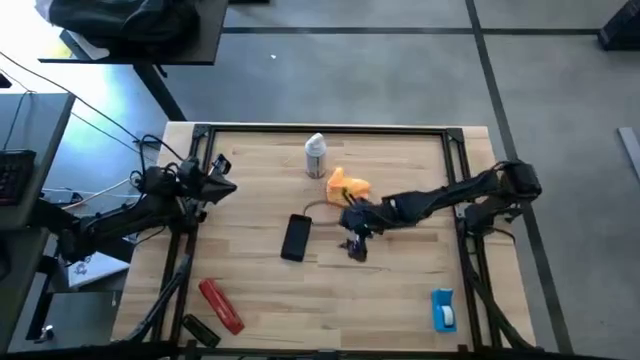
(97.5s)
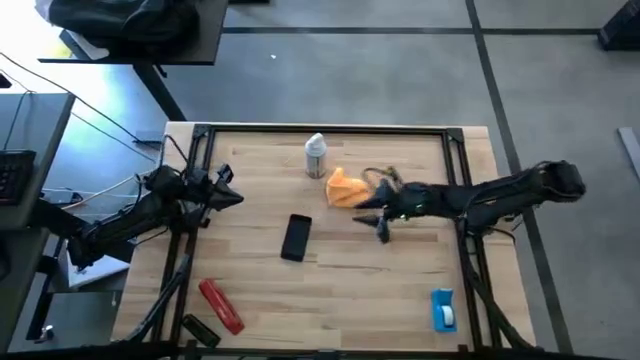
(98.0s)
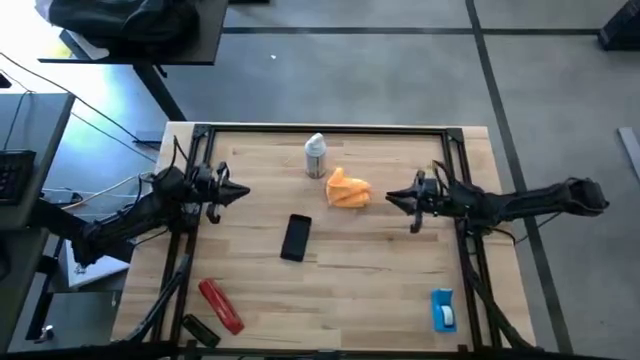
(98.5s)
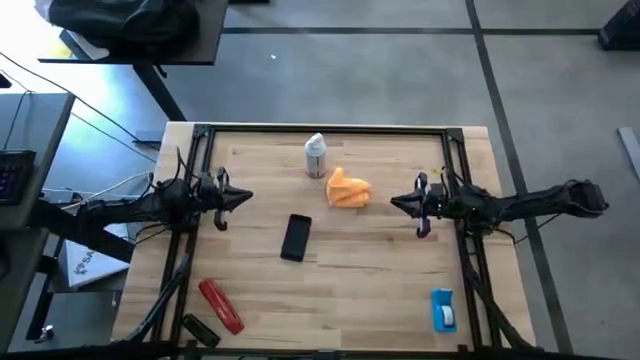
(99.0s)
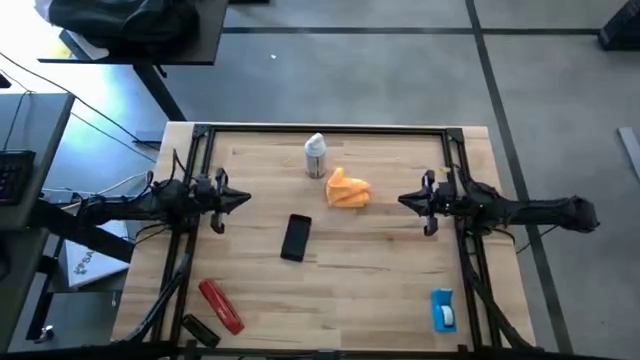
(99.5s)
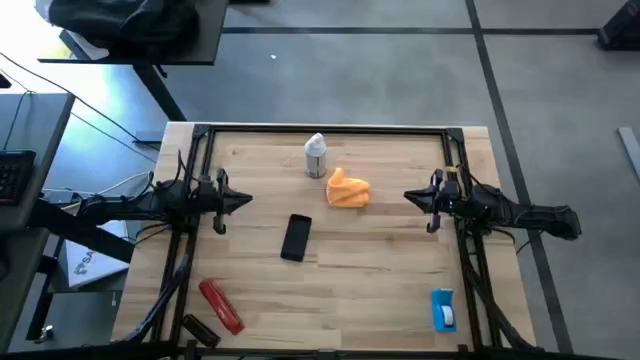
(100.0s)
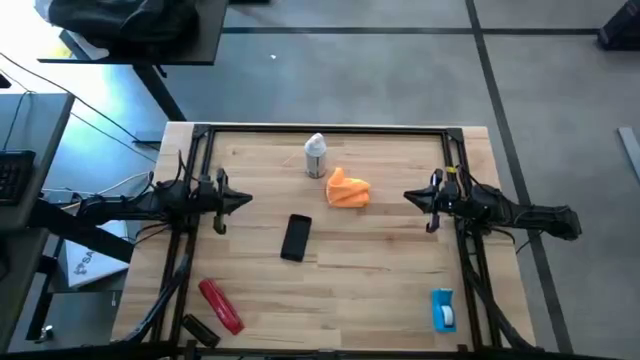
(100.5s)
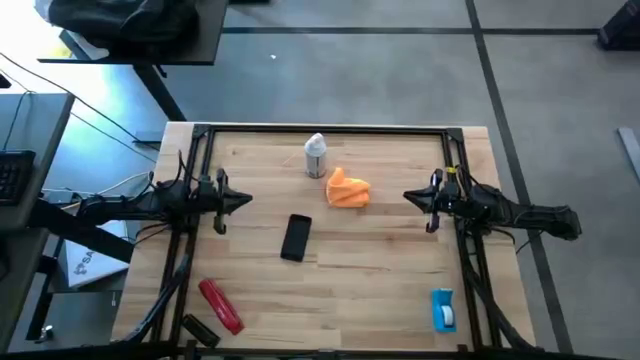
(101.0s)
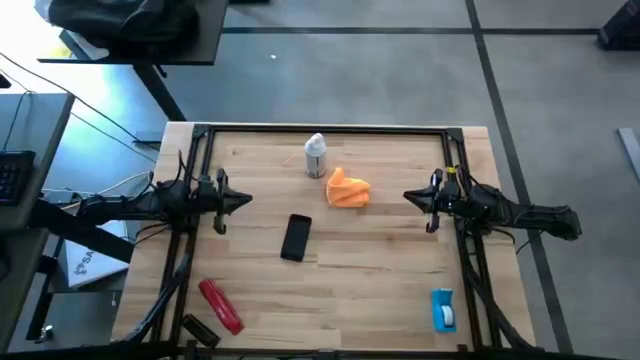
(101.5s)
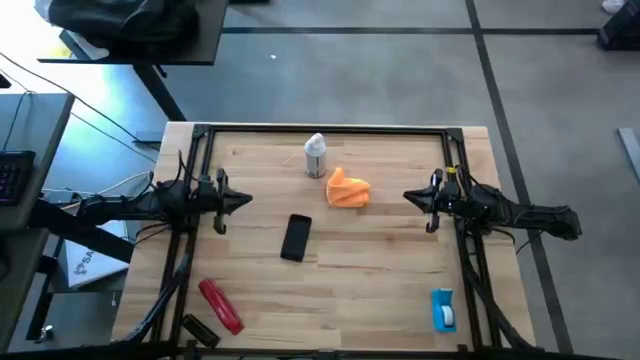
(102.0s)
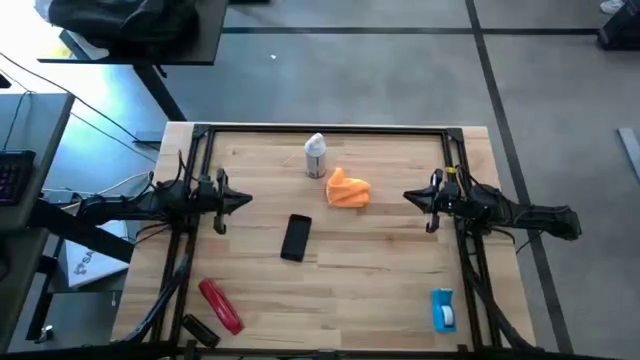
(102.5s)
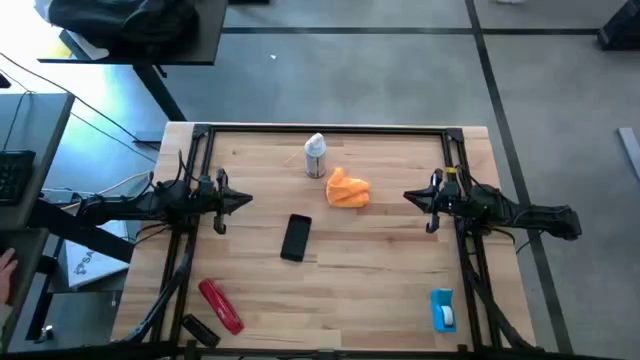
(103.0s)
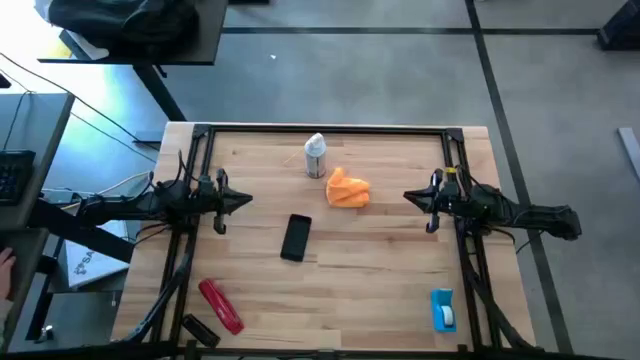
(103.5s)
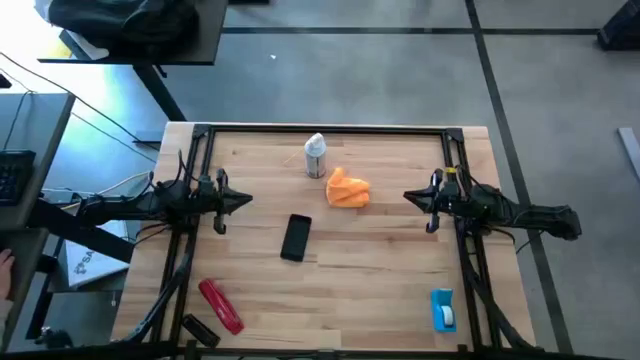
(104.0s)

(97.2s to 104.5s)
Task: Apply microfiber cloth
Return to Home Position

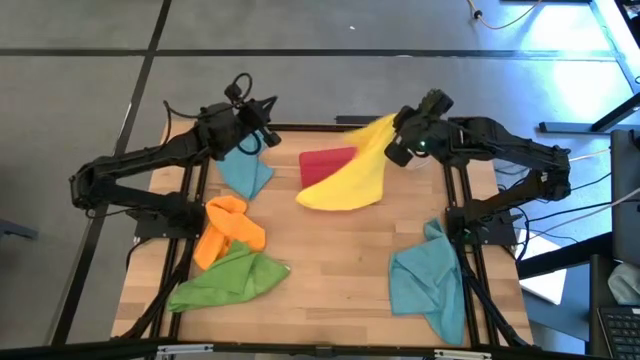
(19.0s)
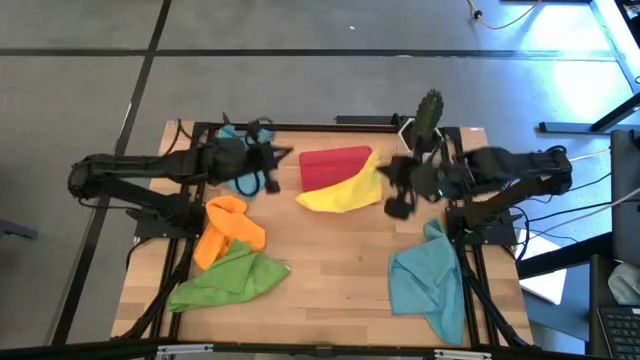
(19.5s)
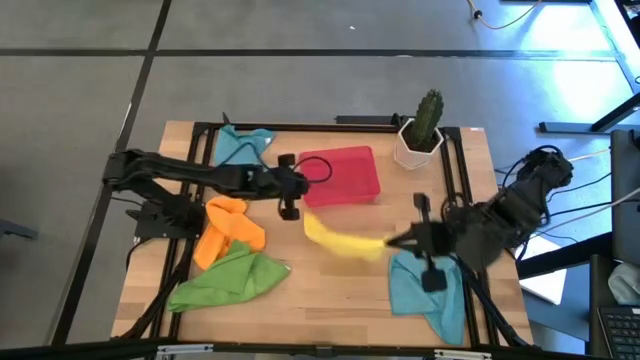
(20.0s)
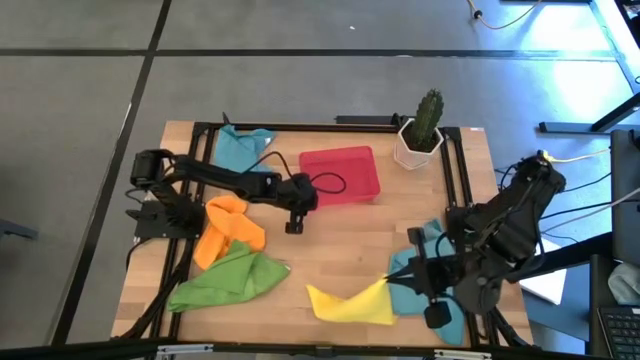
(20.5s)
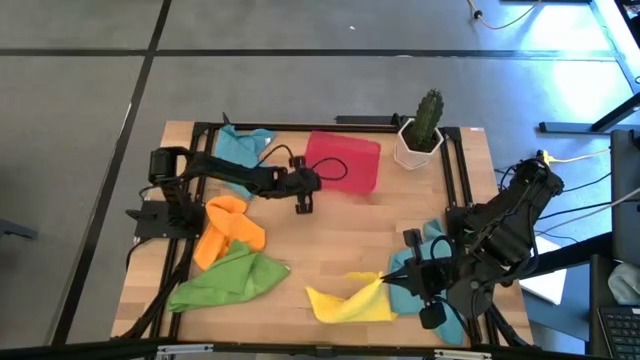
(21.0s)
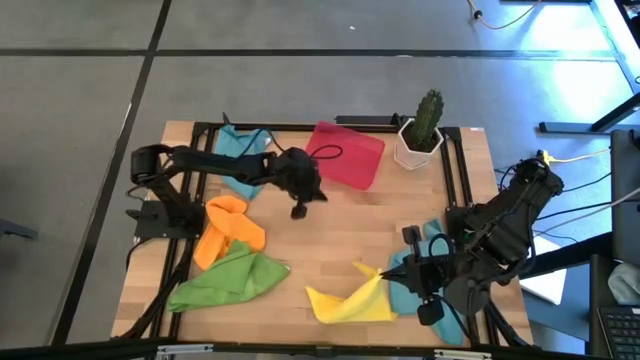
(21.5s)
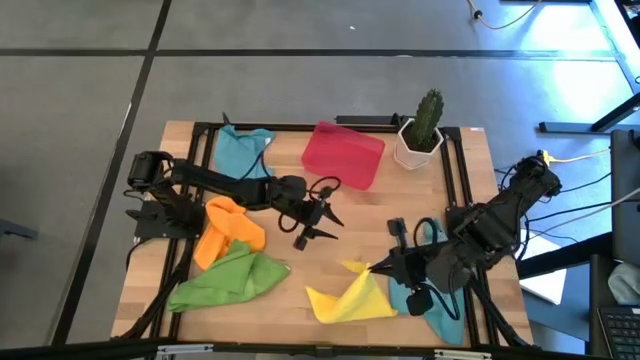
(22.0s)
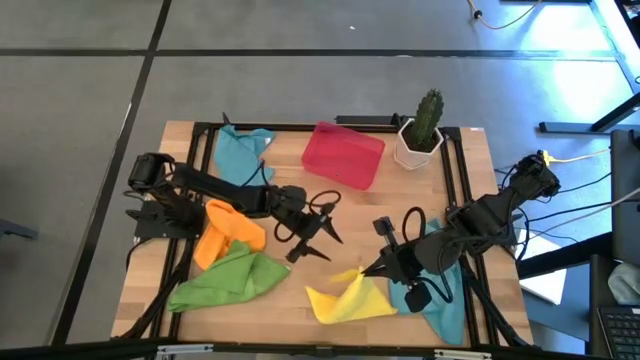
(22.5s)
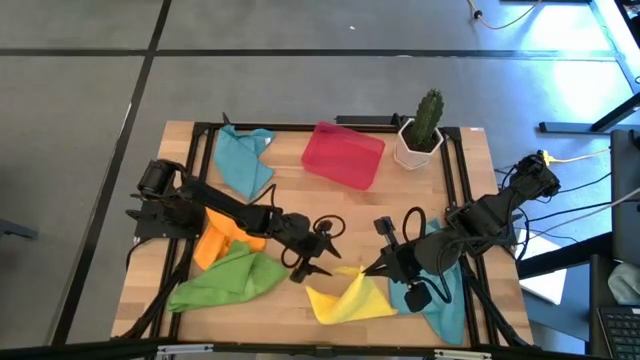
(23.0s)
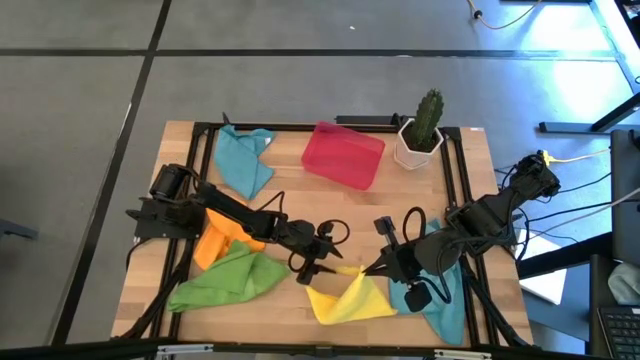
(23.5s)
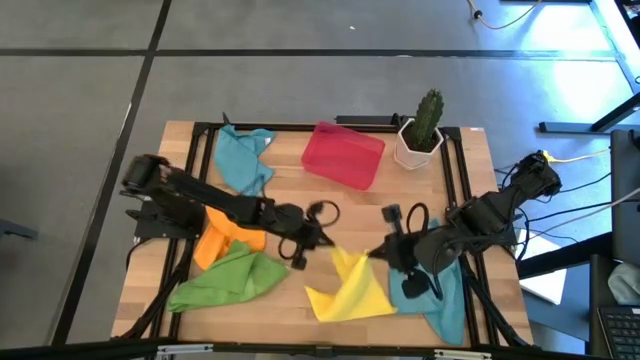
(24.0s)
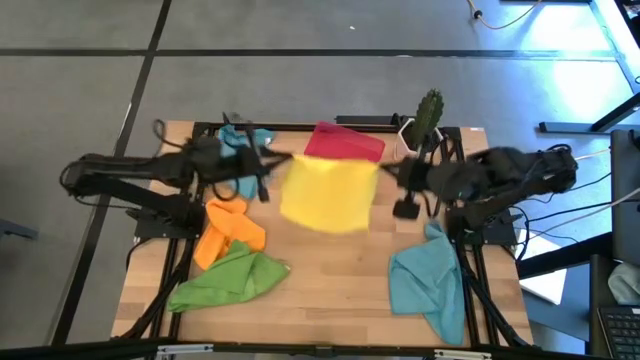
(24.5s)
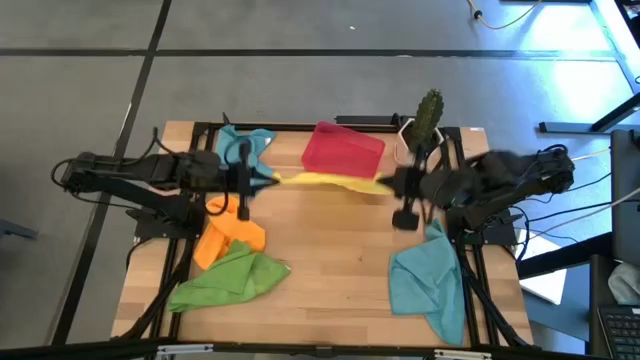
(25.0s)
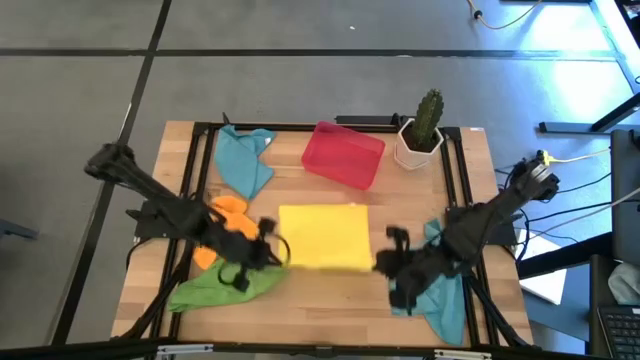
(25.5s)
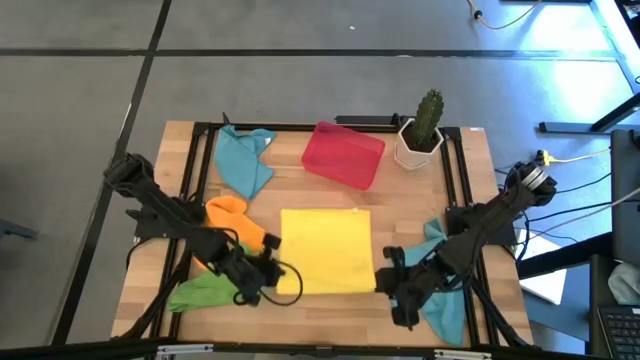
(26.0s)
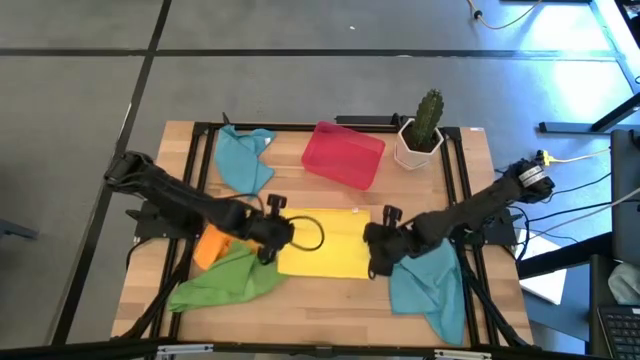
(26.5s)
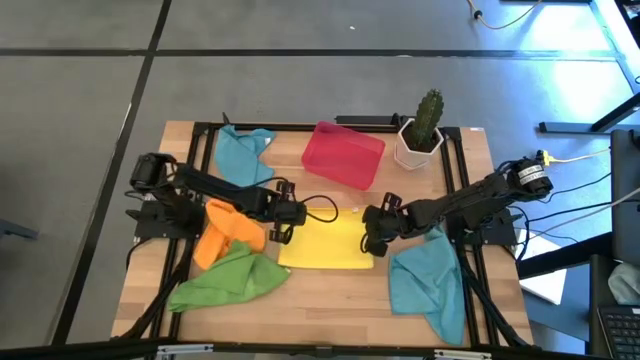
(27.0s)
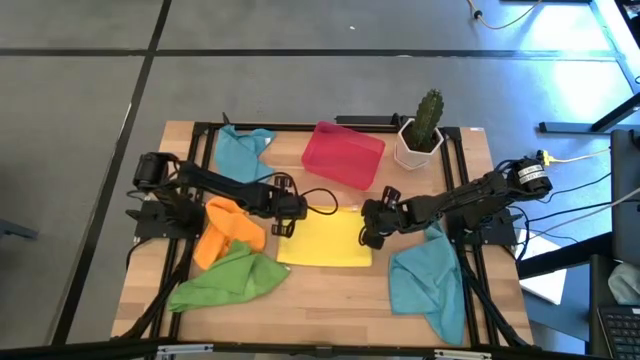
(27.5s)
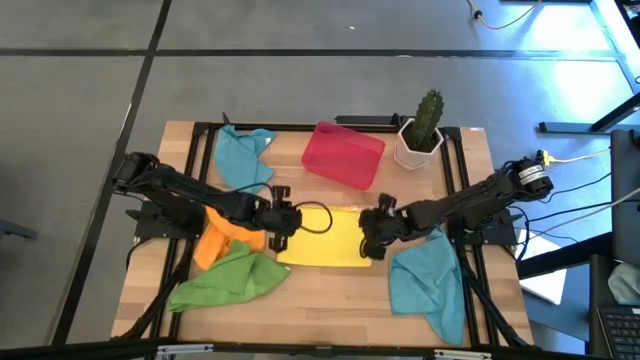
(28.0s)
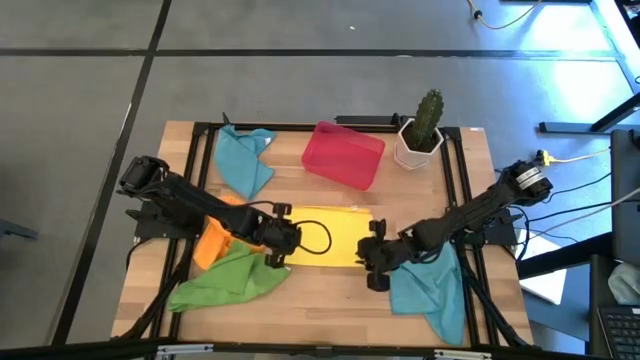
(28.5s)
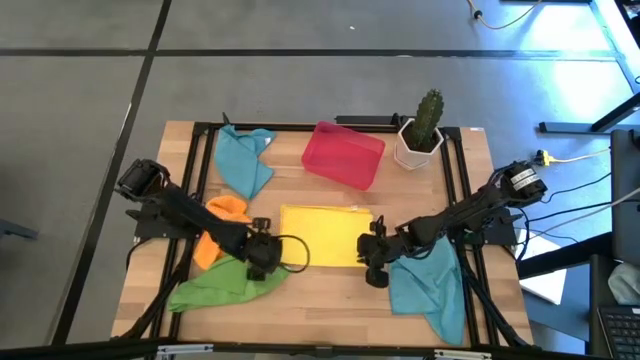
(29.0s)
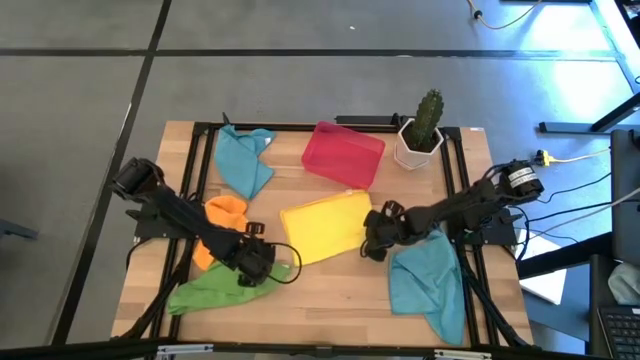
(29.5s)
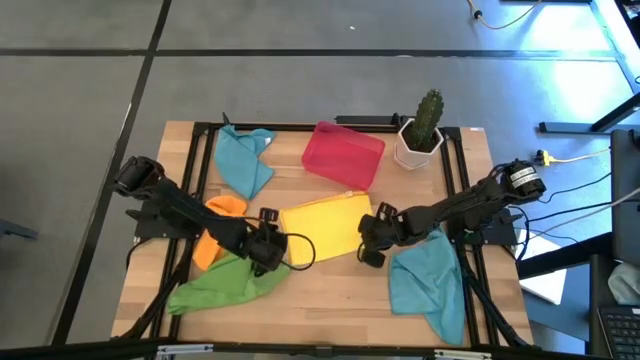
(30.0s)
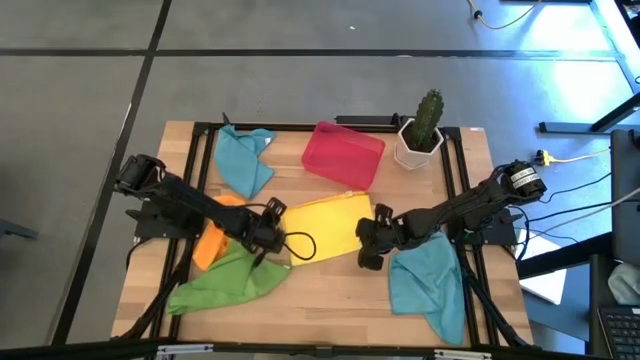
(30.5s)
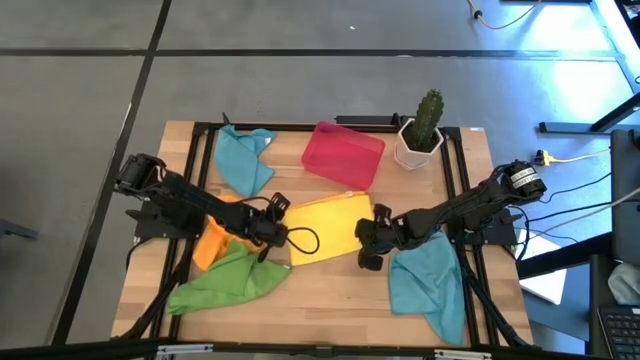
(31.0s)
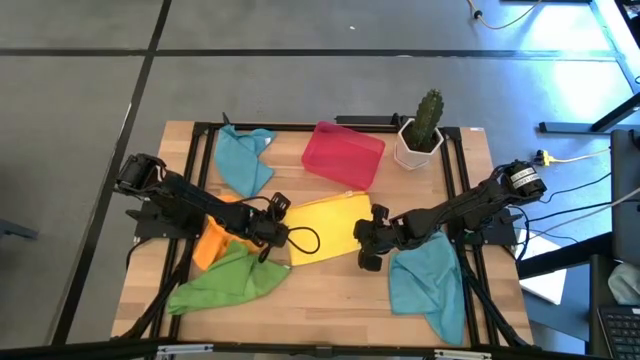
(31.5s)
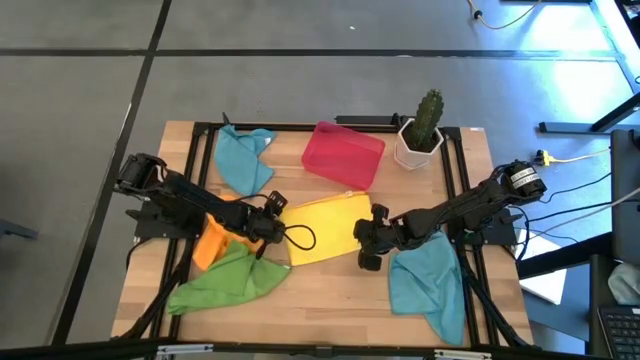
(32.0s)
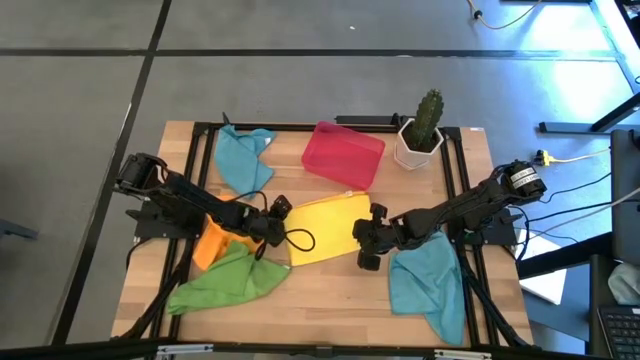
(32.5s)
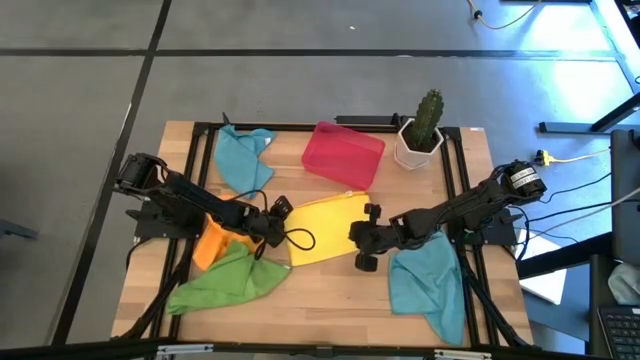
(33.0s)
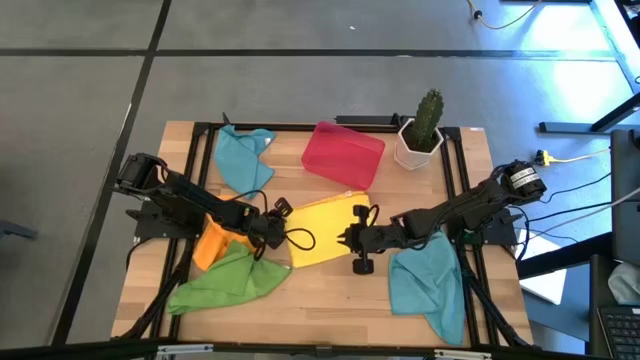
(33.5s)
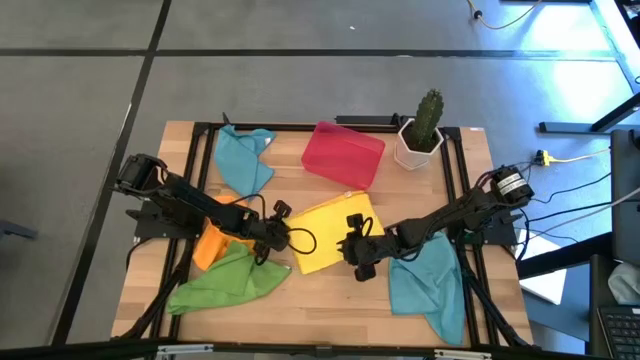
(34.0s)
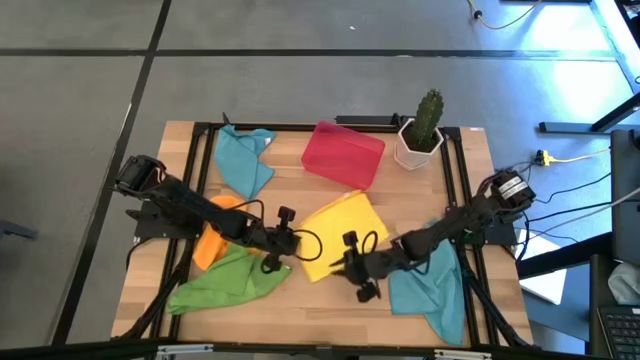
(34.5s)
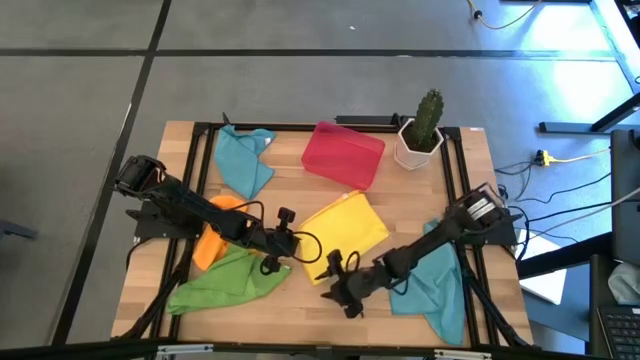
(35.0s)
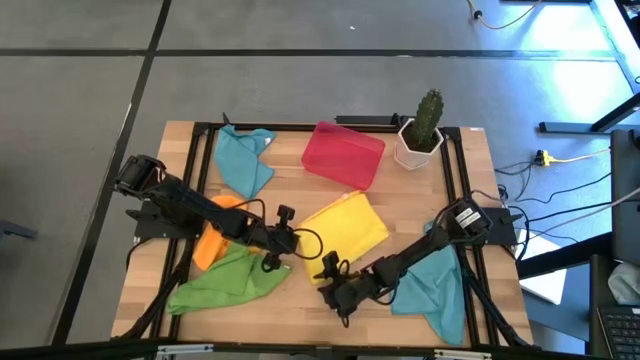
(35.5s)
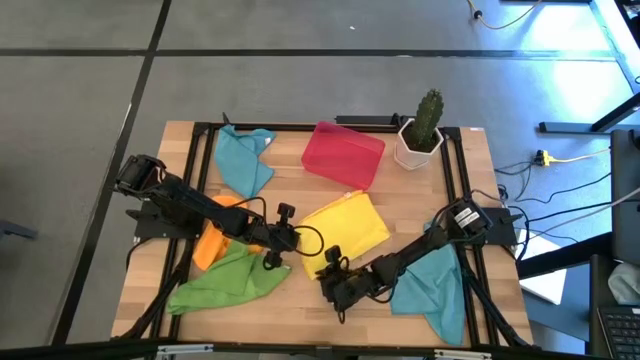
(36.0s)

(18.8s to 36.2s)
Task: Roll microfiber towels into tight, uniform cylinder then place into a basket
Roll the yellow towel
